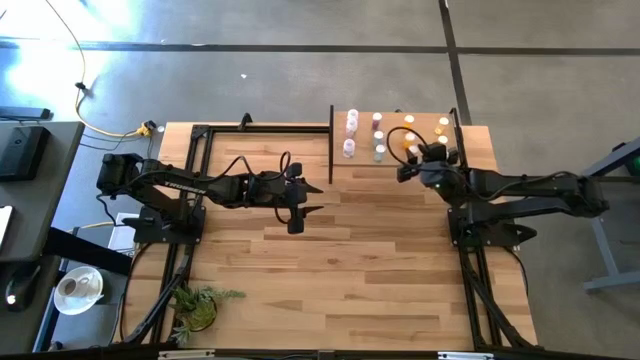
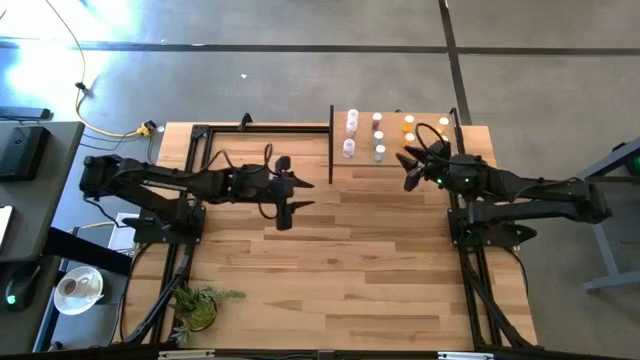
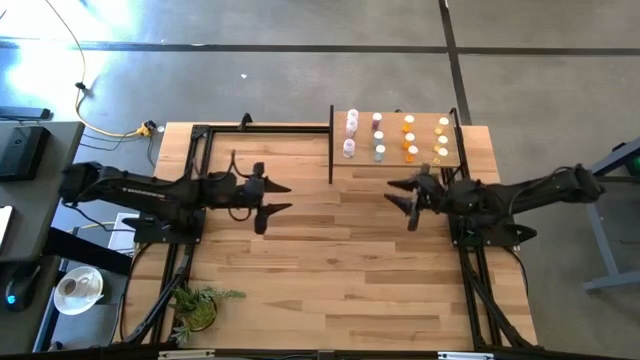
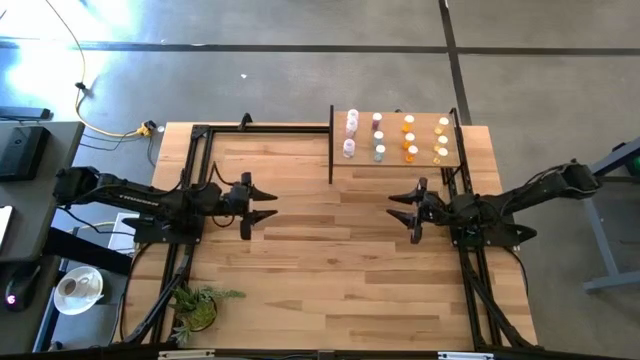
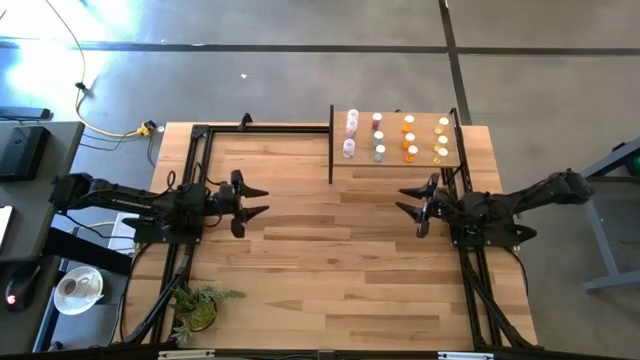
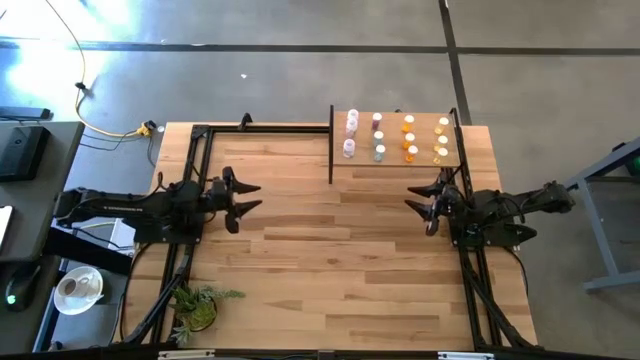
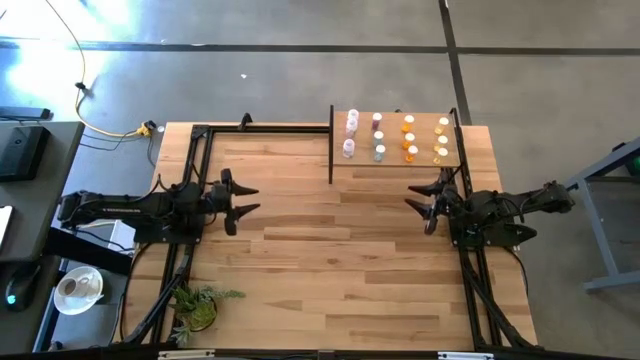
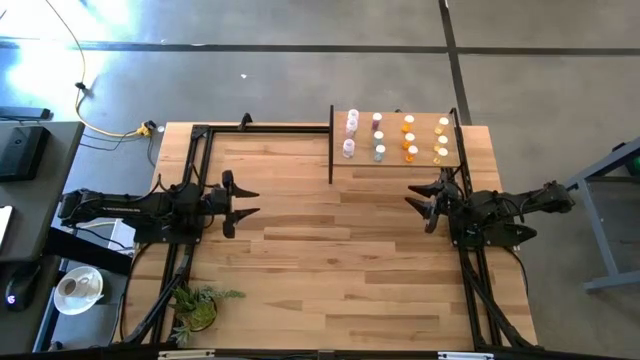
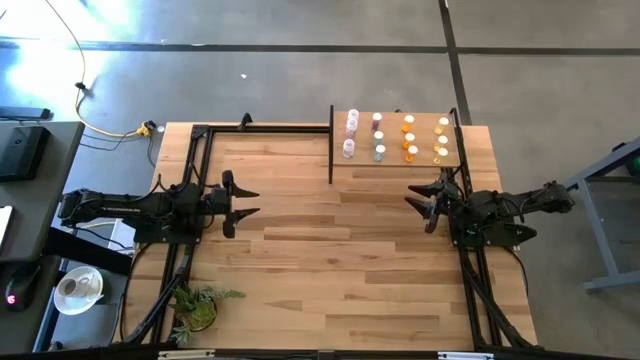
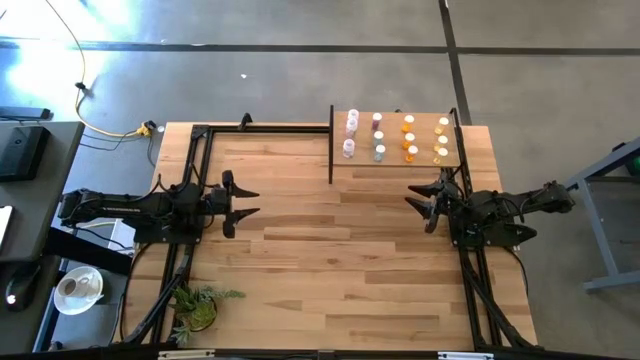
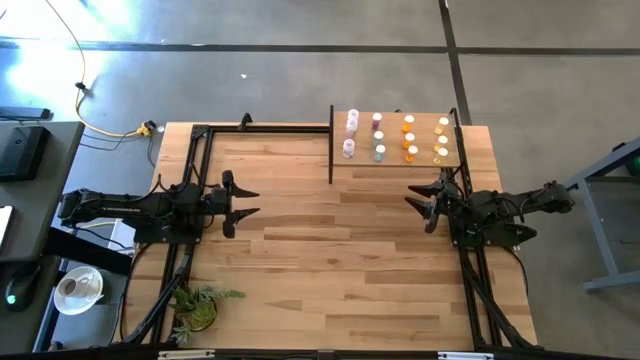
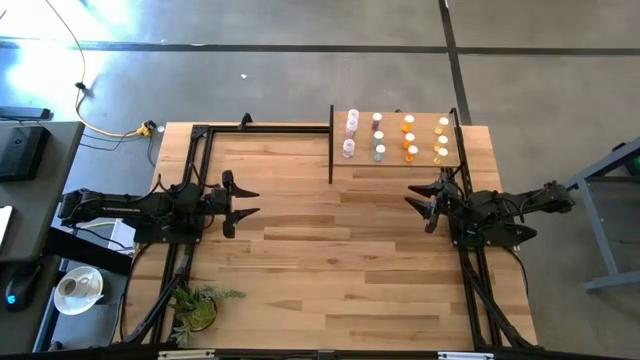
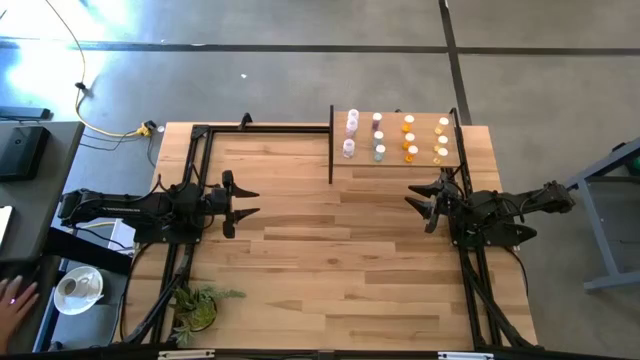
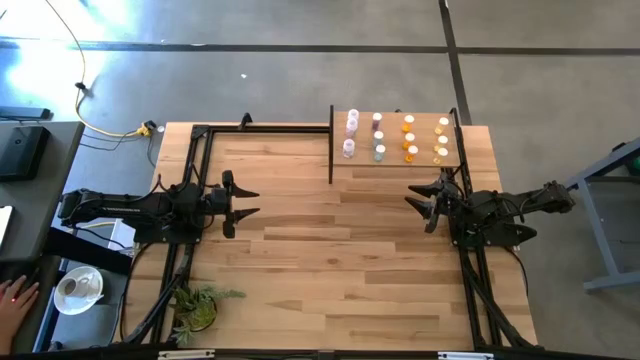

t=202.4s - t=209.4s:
Task: Pick and place medicine bottles onto shelf by color
Return to Home Position

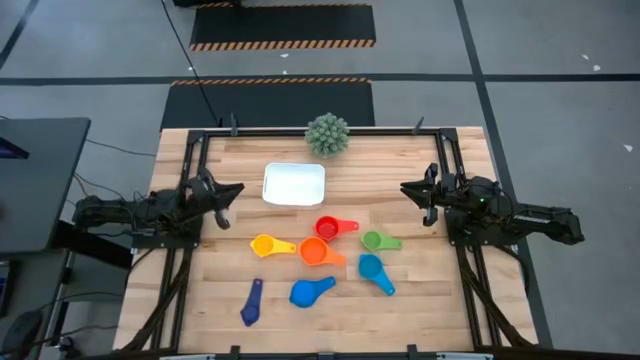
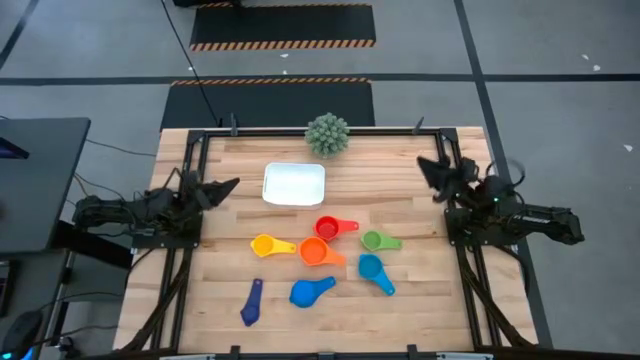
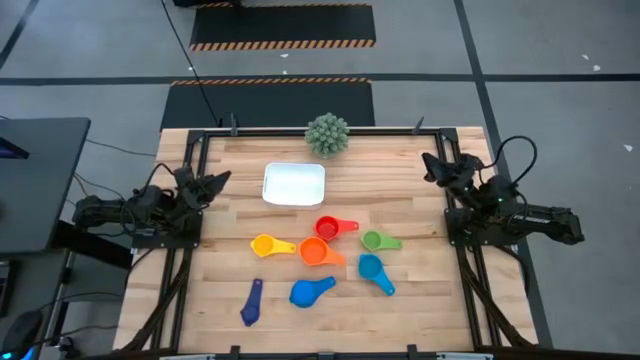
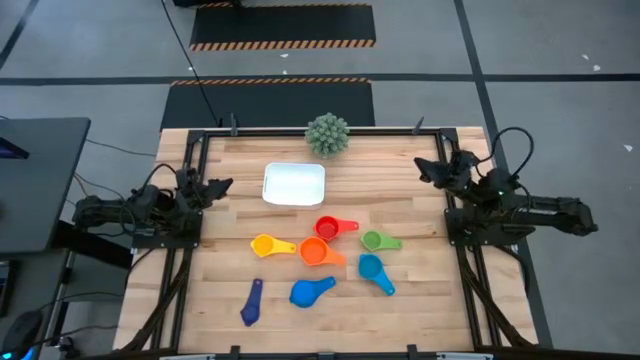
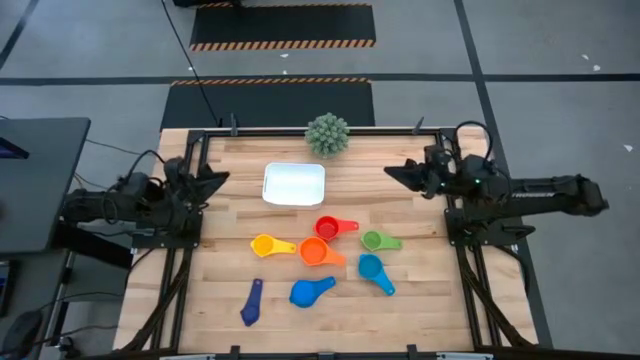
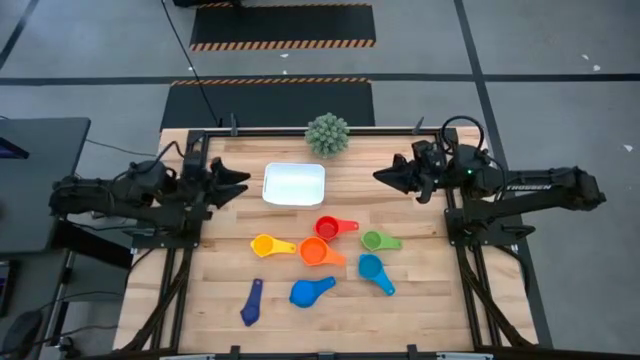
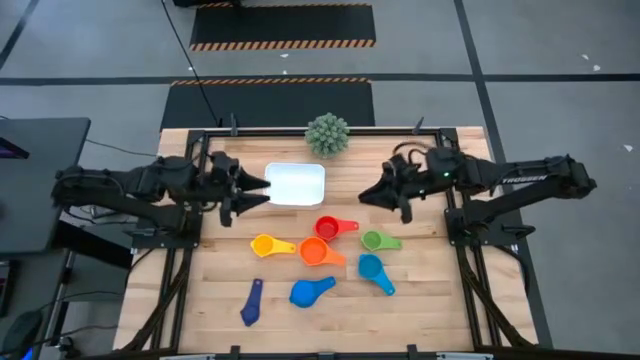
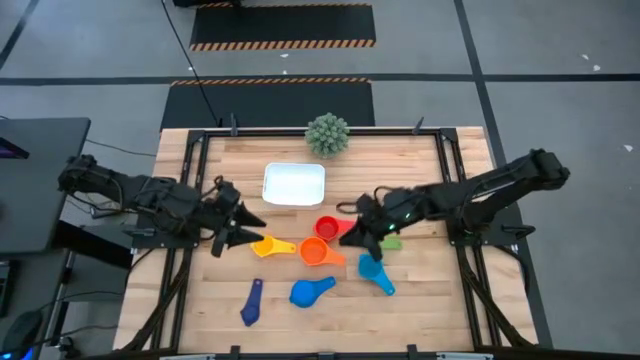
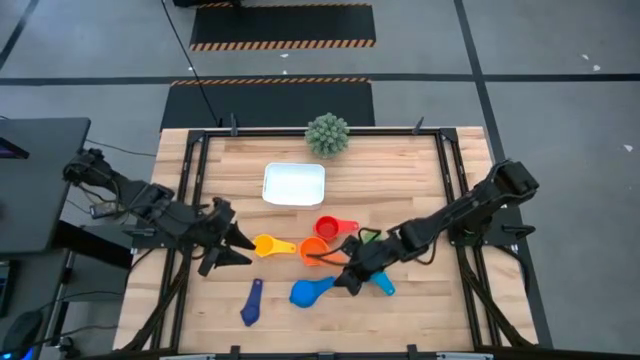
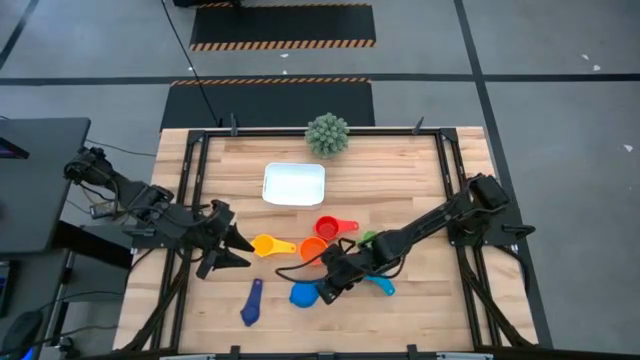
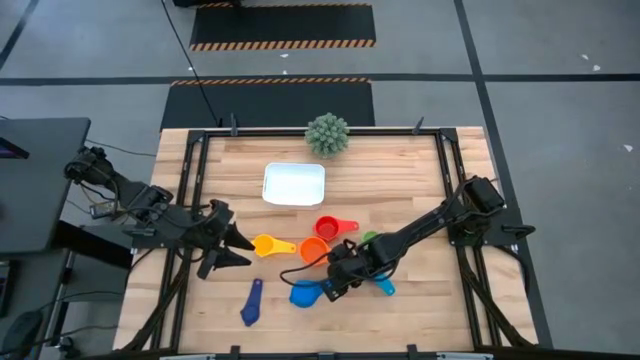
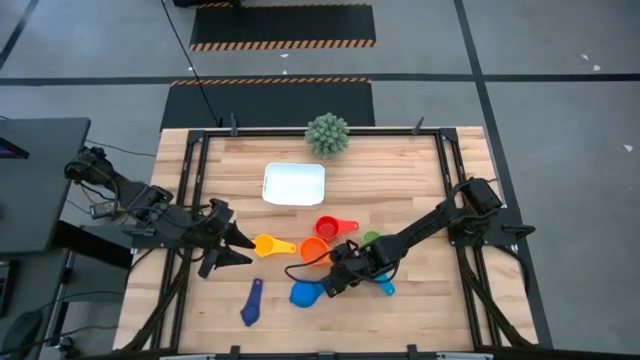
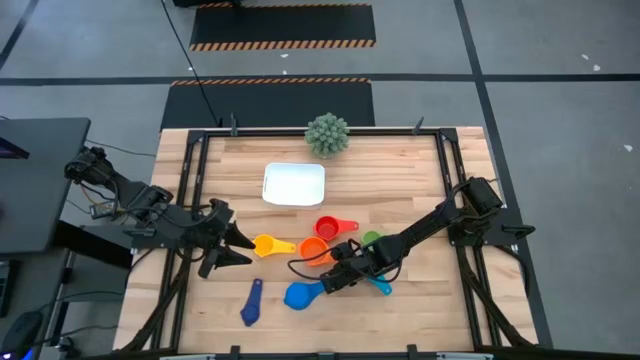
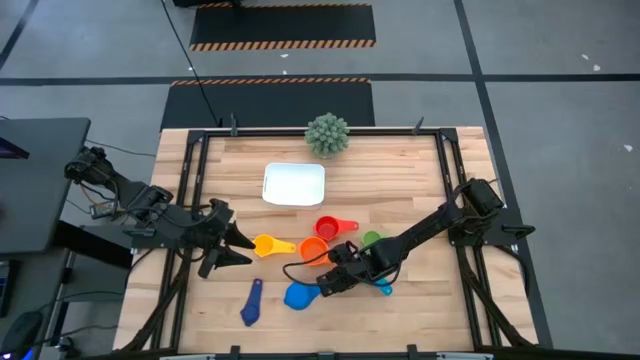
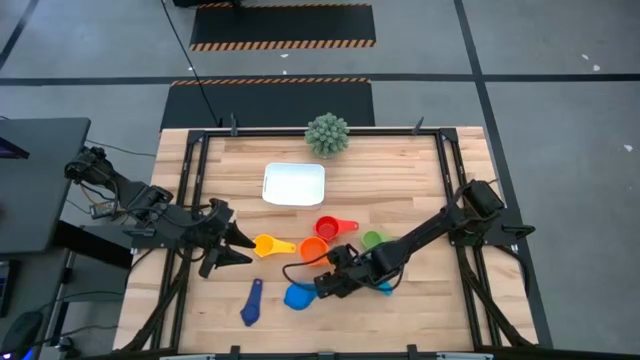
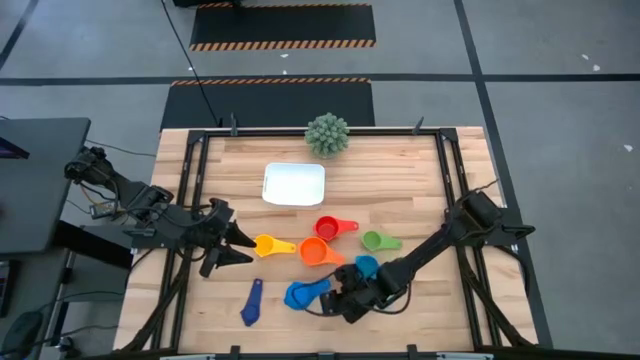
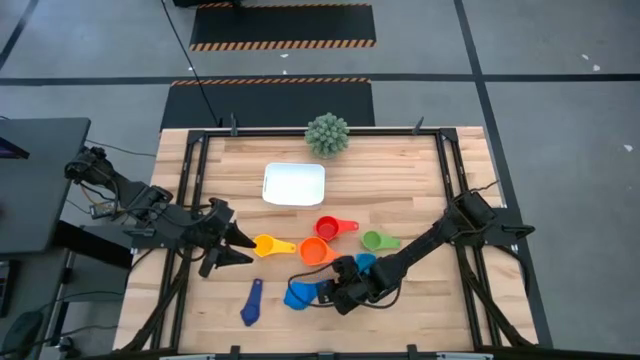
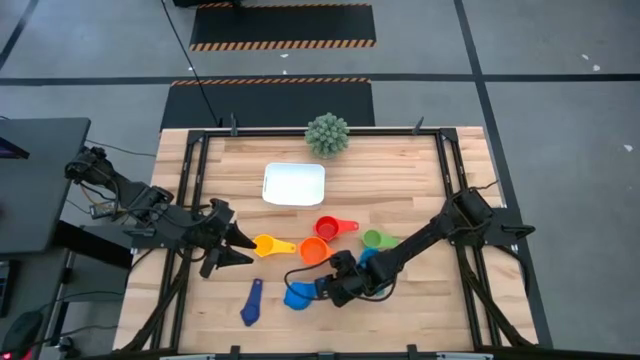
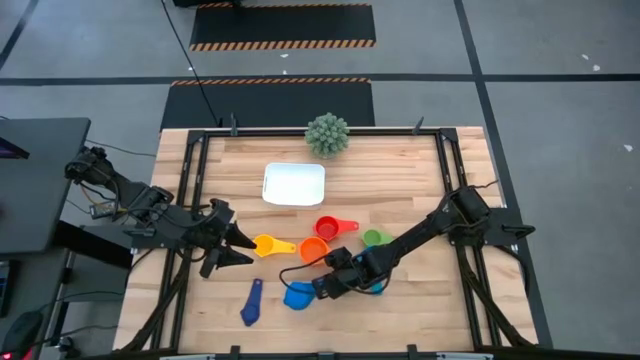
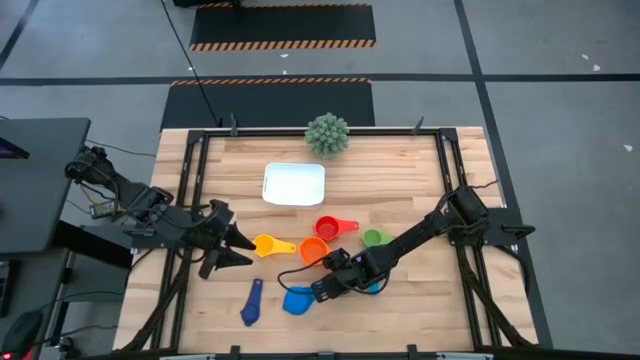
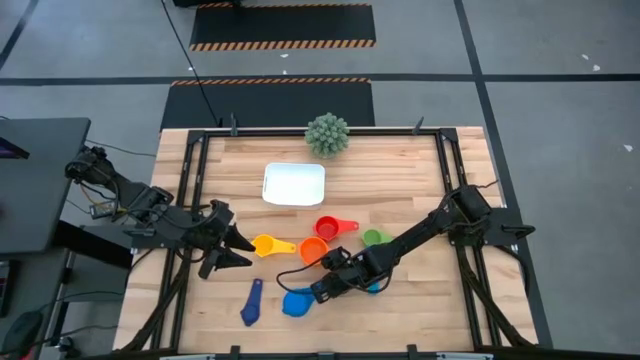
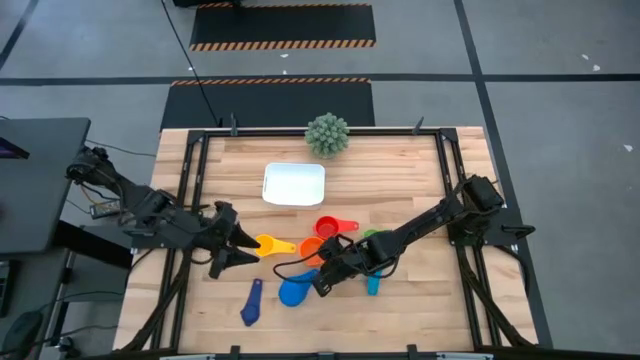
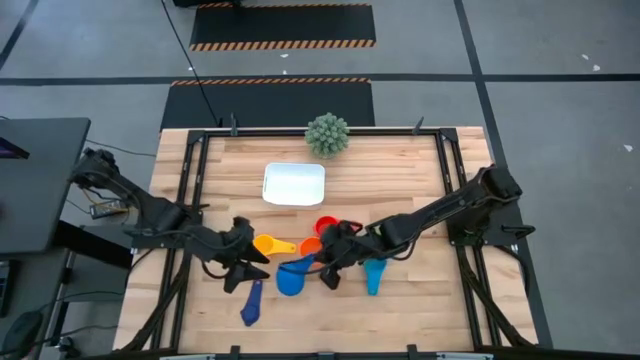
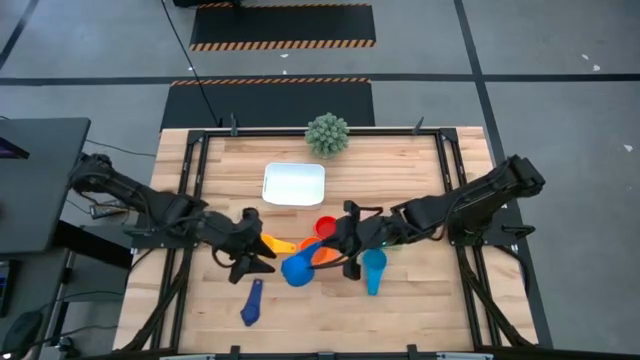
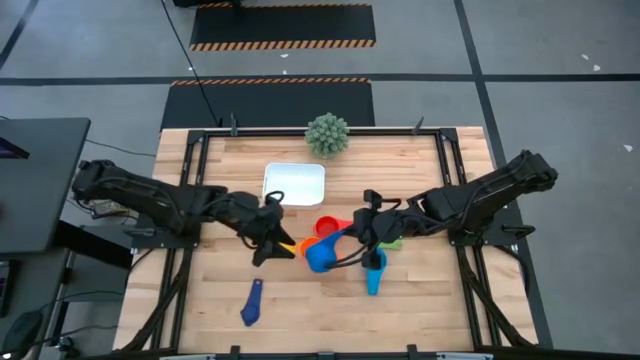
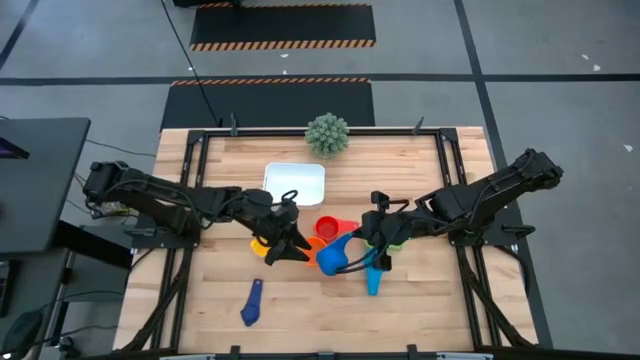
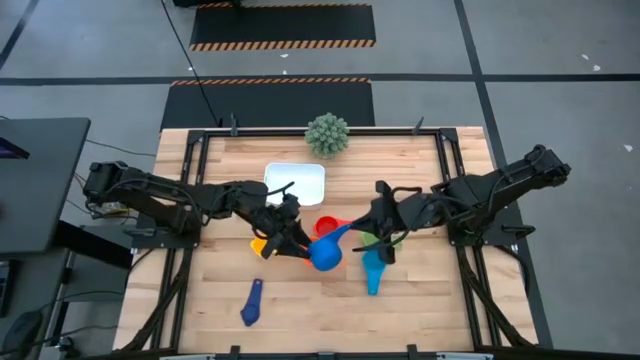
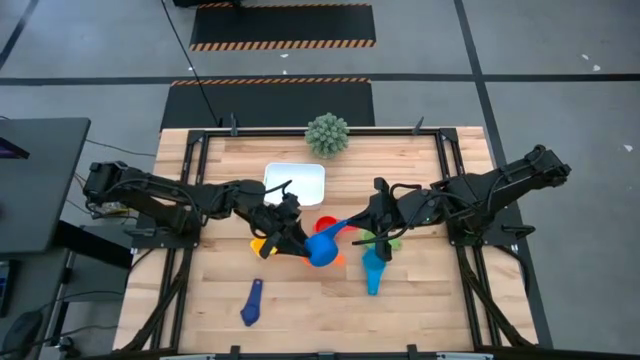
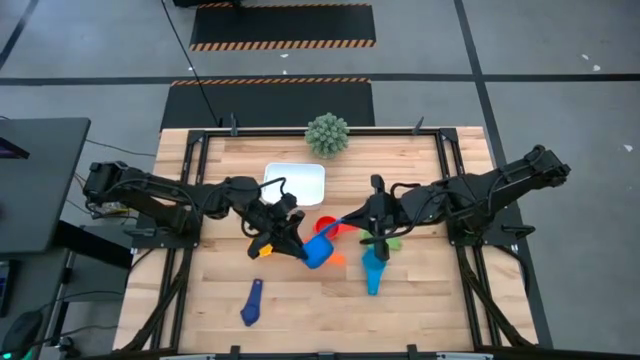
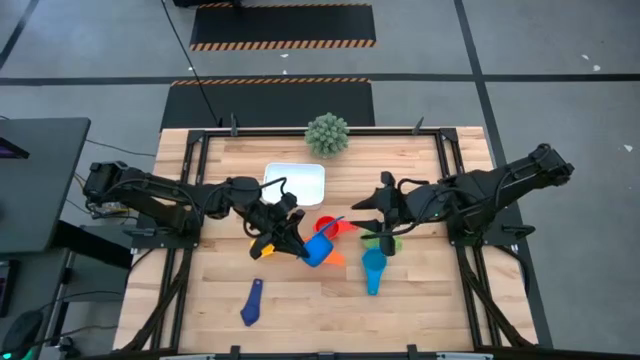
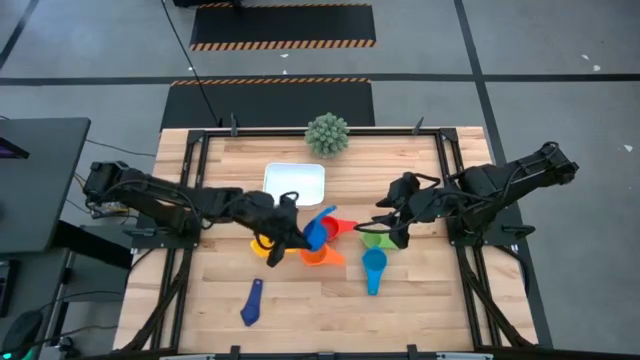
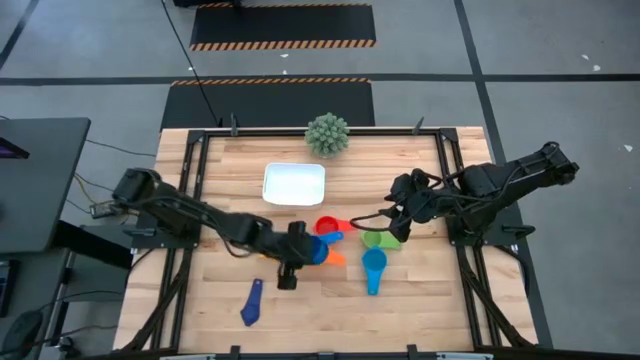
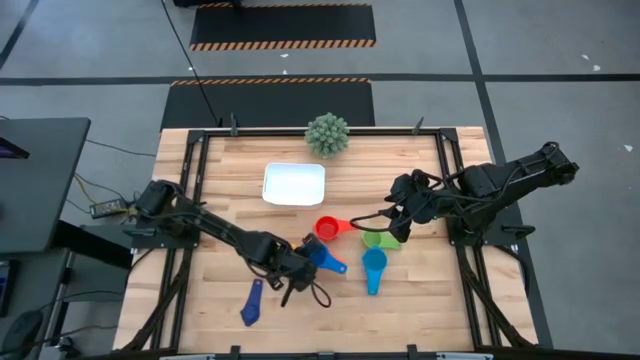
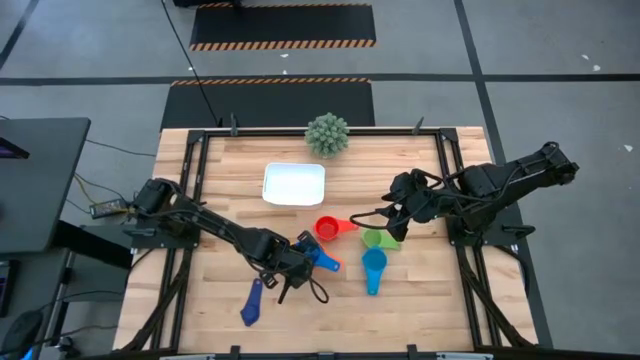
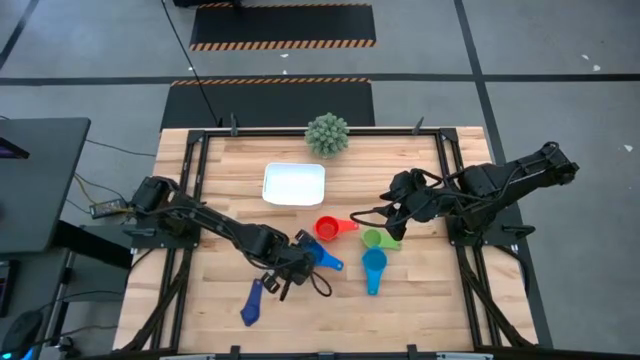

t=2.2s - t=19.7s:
Task: Nest measuring cups in basket
Stack the left light blue measuring cup on top of the orange measuring cup
